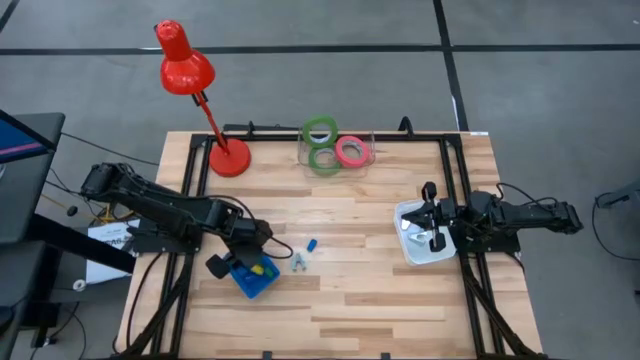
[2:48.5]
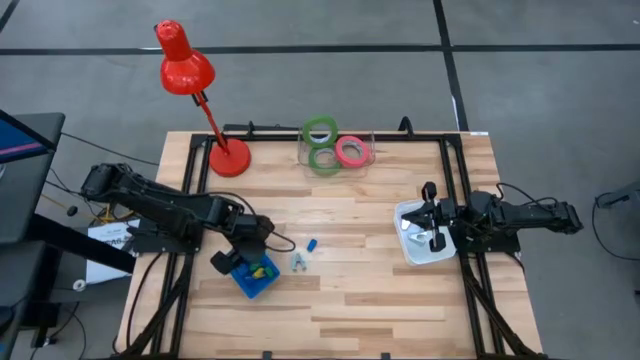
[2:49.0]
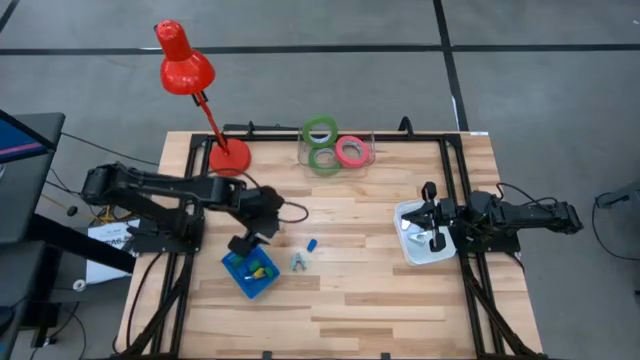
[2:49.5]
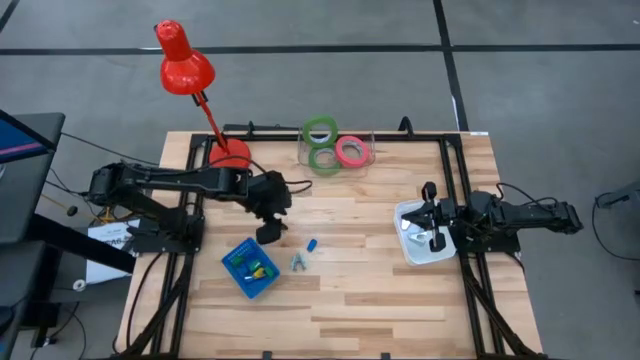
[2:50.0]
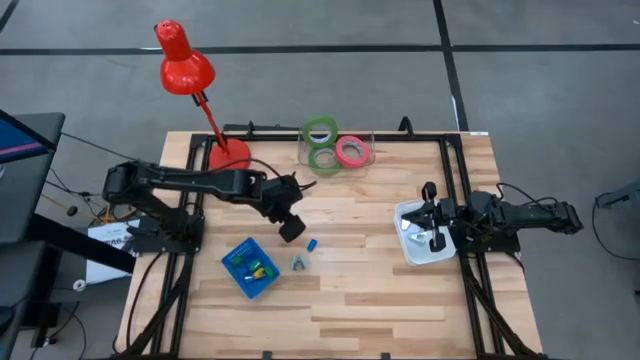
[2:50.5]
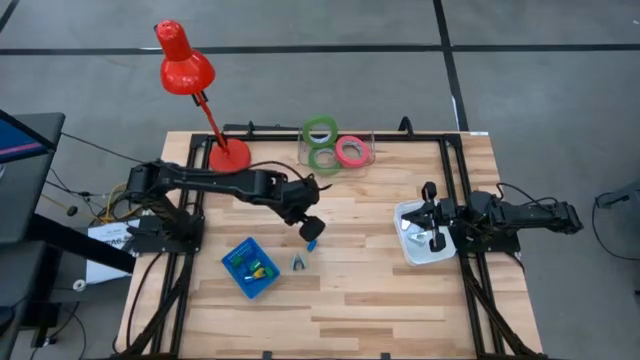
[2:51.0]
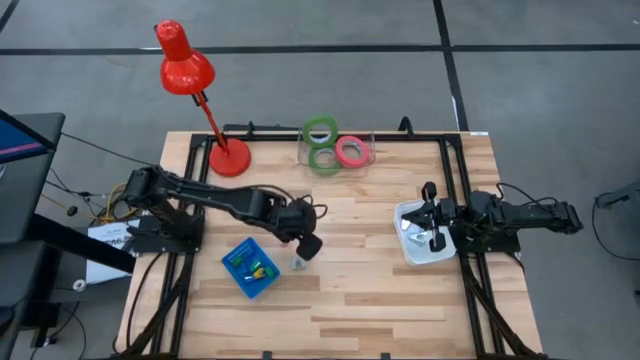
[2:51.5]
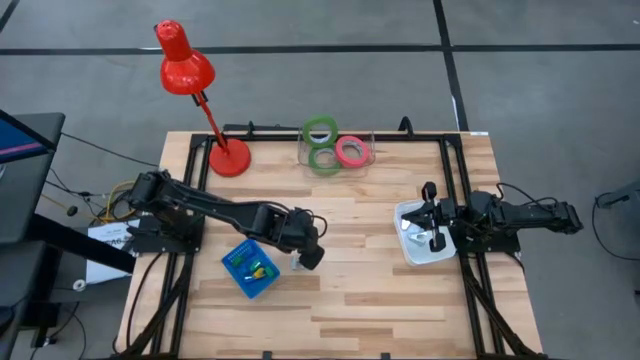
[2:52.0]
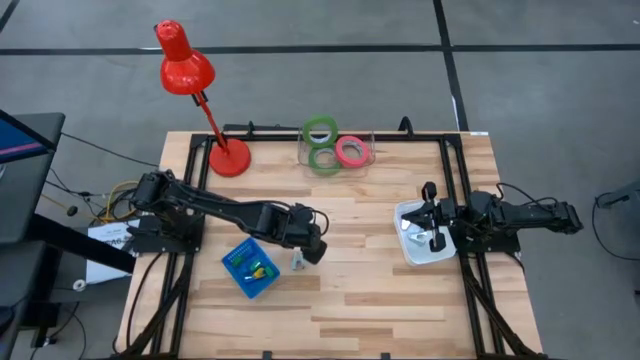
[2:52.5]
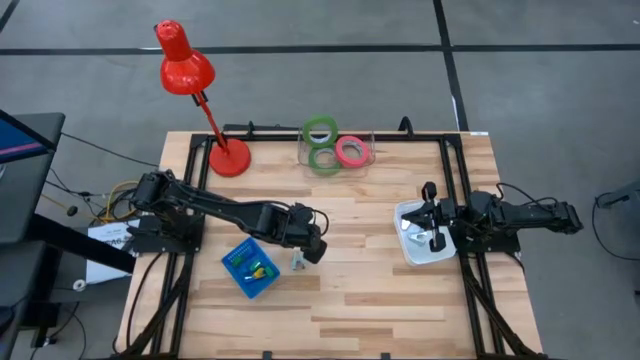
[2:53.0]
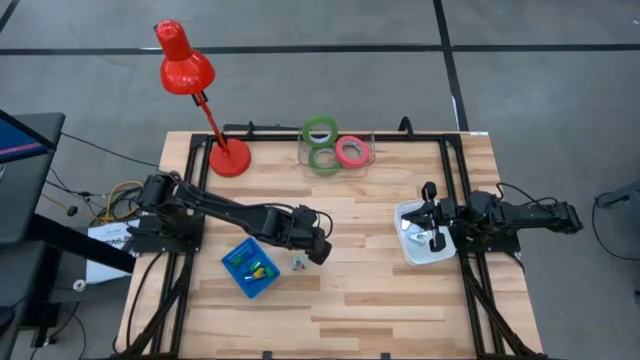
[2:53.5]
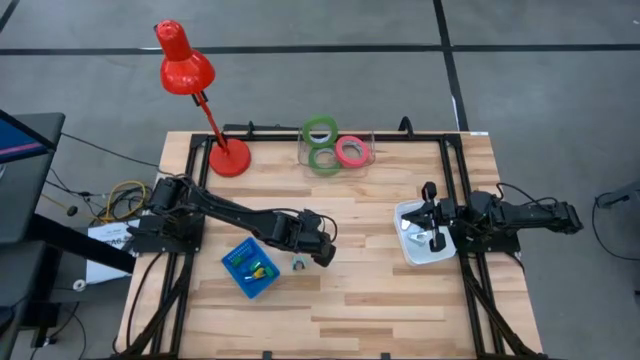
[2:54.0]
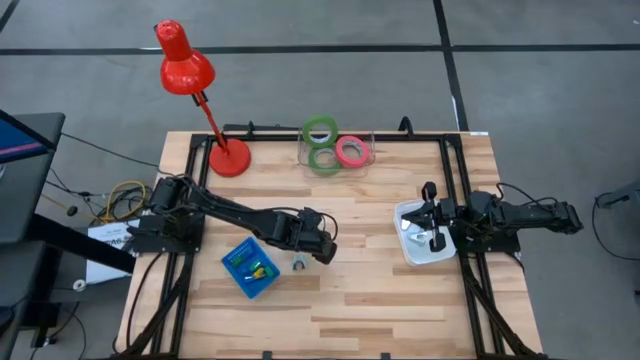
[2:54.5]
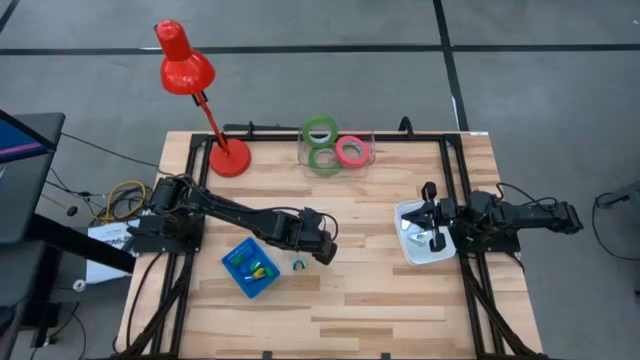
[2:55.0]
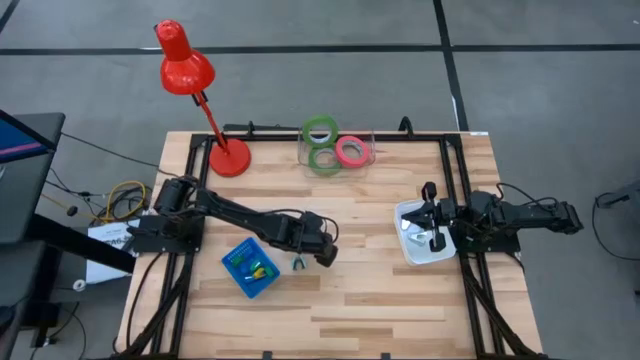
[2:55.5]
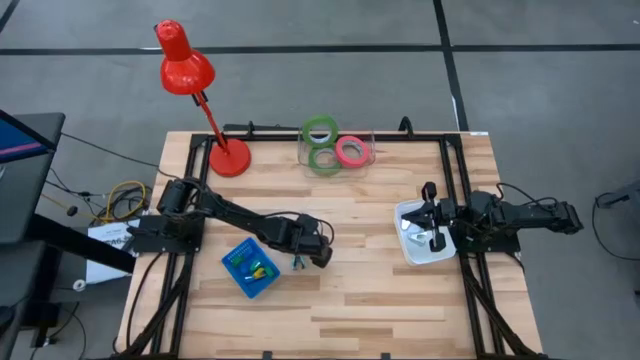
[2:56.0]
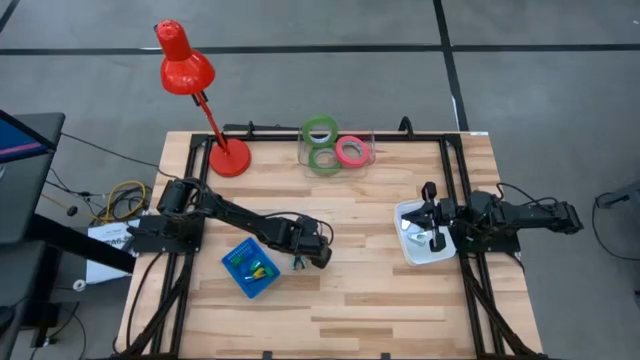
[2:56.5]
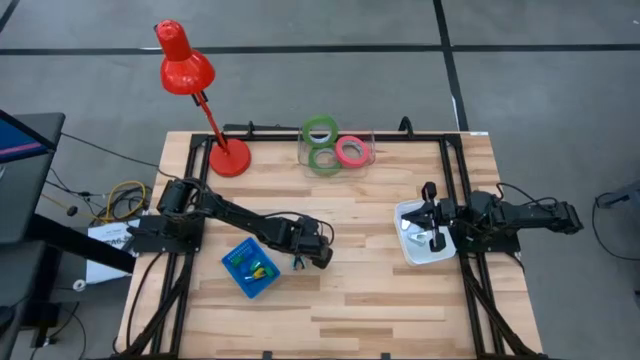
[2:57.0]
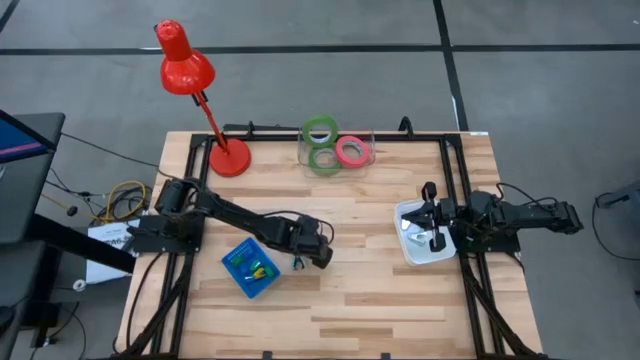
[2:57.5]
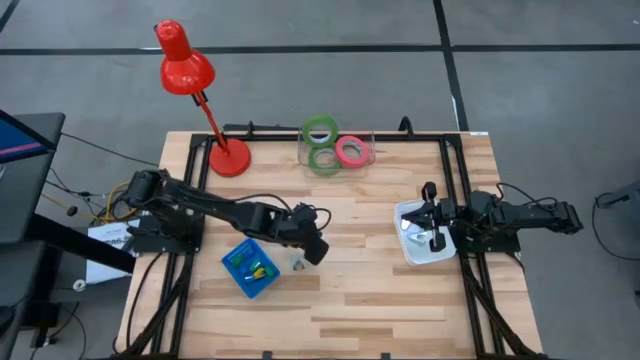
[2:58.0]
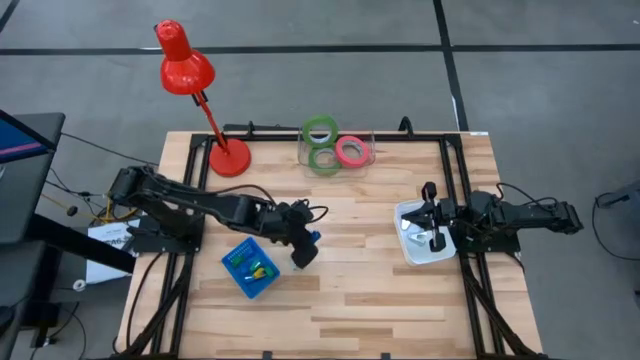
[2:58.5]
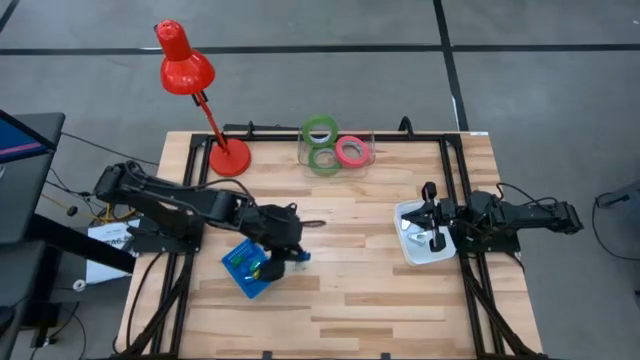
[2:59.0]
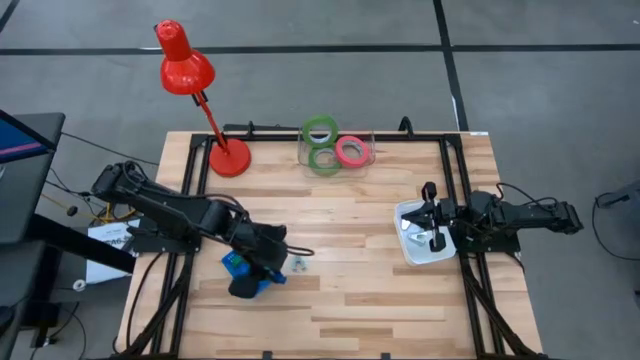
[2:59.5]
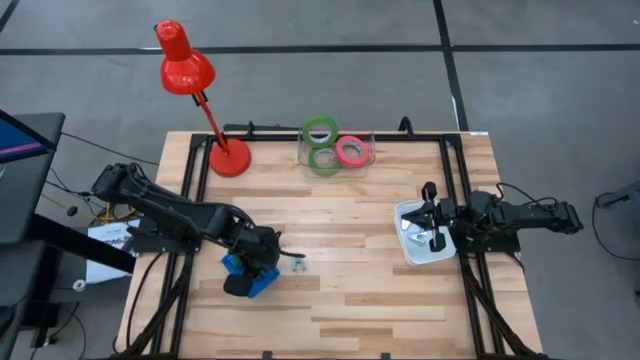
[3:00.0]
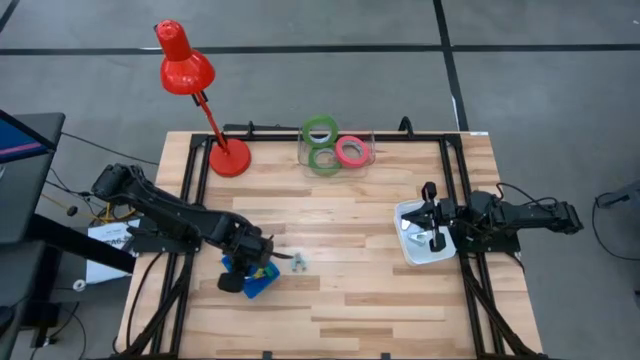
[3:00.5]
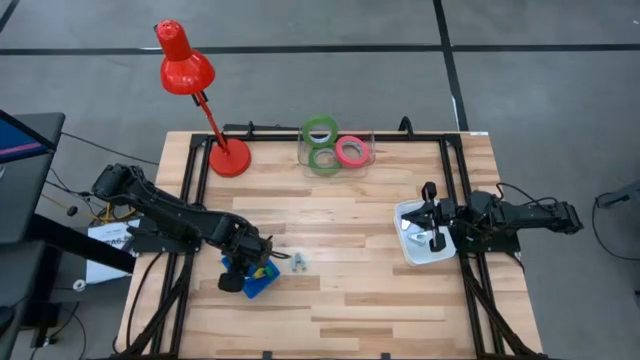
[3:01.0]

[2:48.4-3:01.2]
Task: Pick and place Stapler, Stapler remover, tape
Put the blue stapler into the blue bin

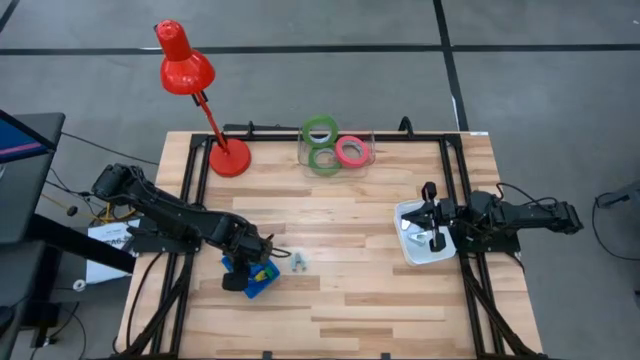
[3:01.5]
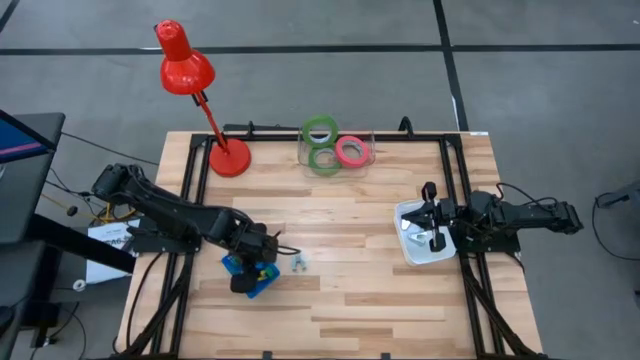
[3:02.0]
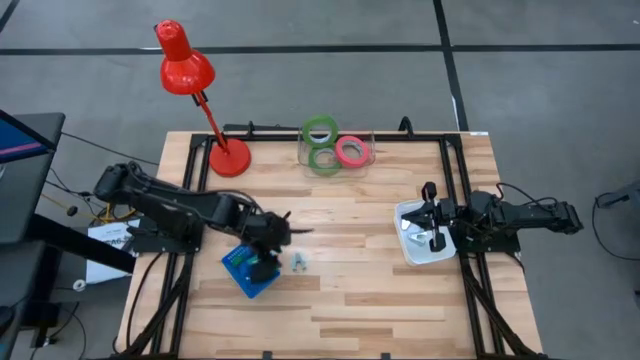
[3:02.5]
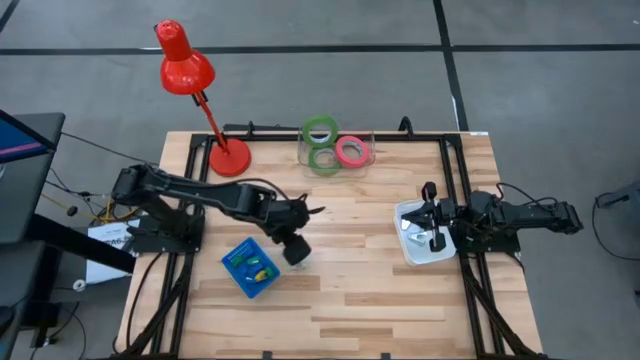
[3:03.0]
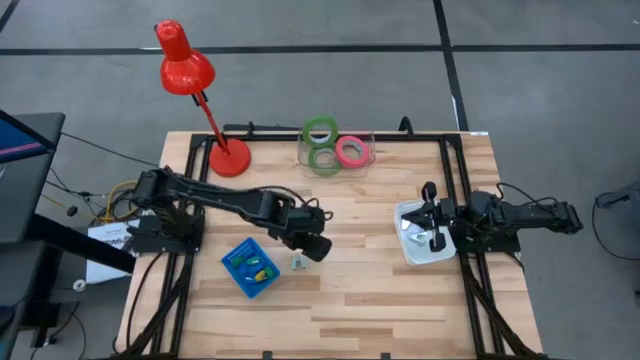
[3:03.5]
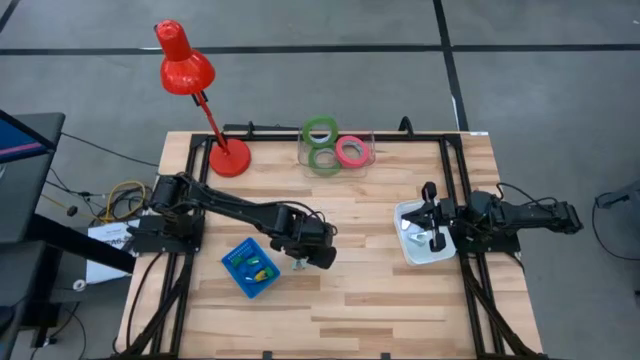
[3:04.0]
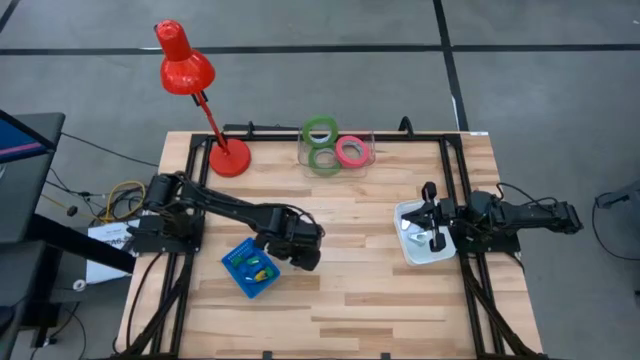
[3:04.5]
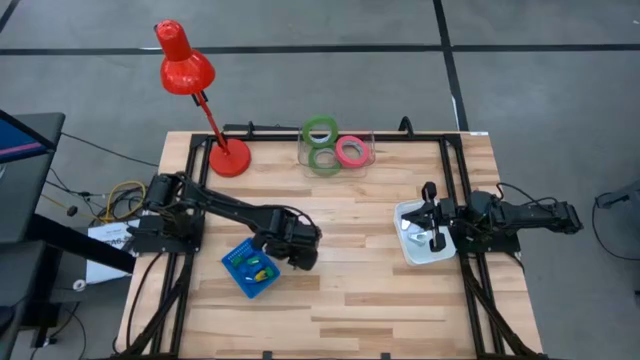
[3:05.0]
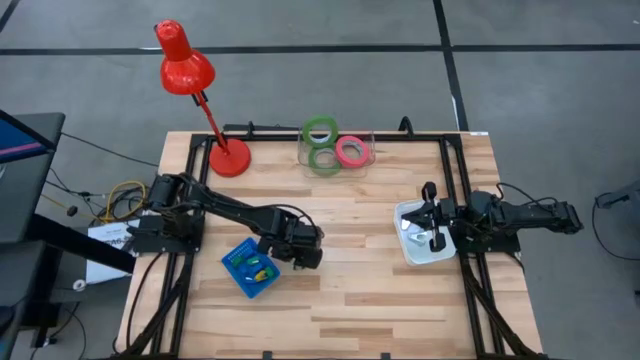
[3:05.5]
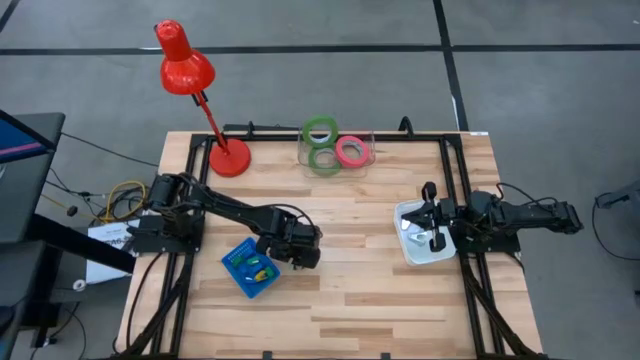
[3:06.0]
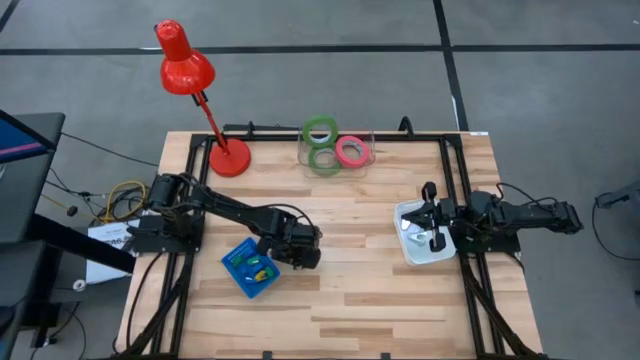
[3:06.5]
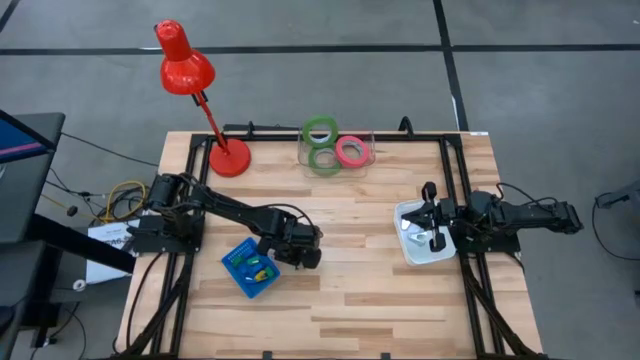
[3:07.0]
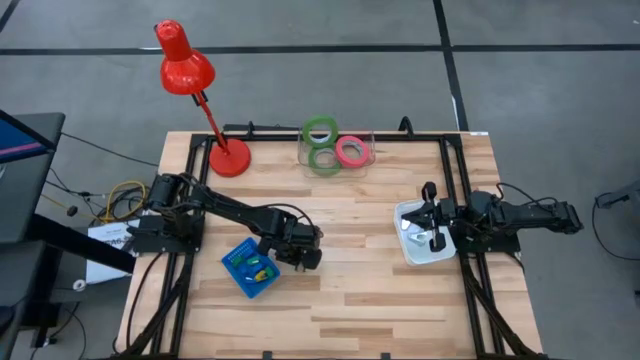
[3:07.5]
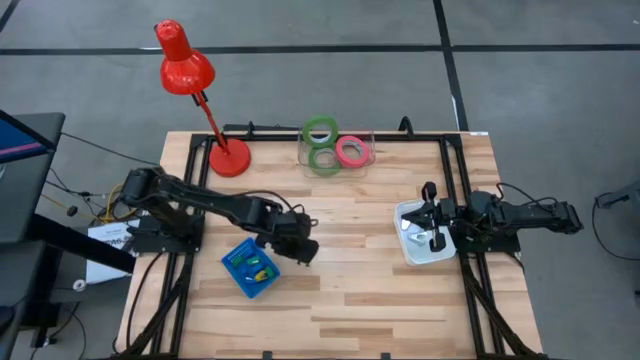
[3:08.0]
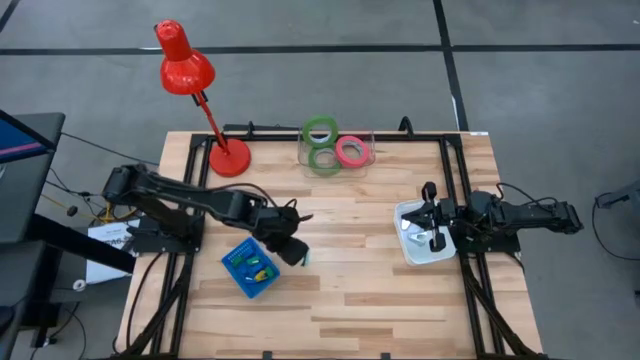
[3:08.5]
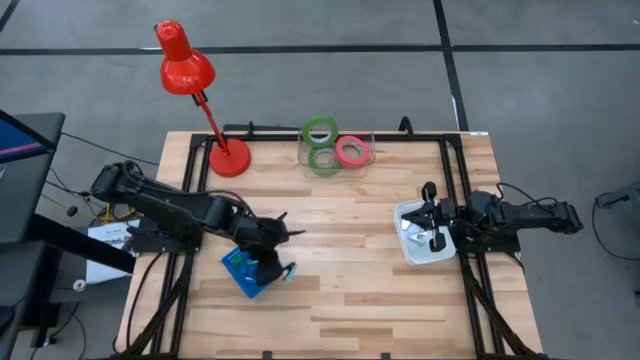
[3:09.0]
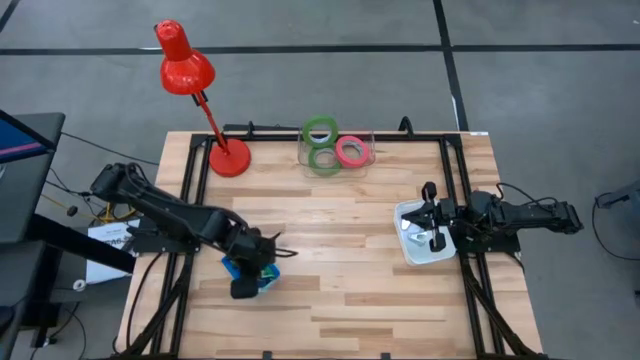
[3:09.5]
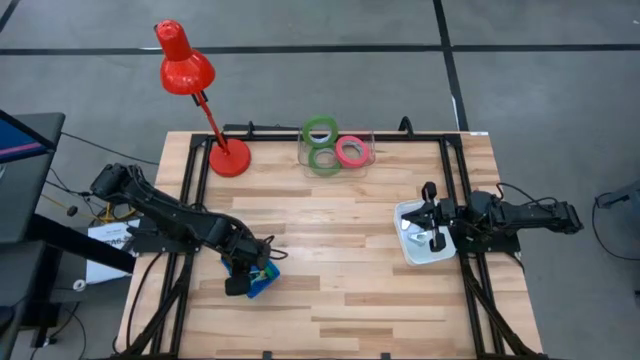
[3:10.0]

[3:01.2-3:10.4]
Put the light blue stapler remover into the white bin
